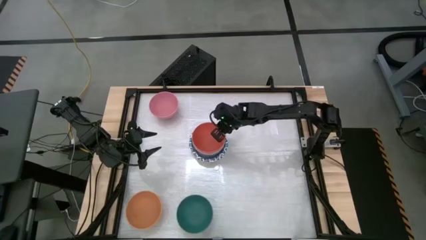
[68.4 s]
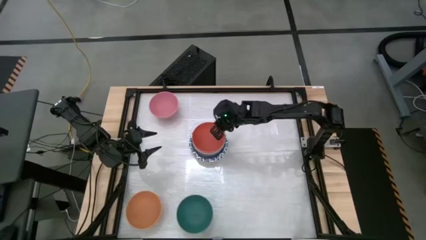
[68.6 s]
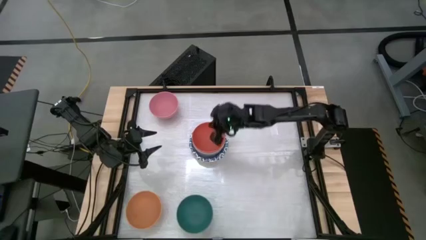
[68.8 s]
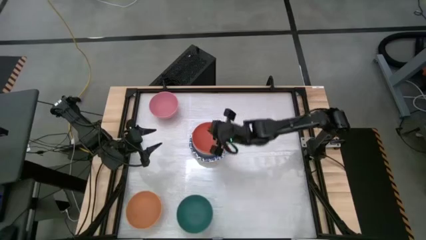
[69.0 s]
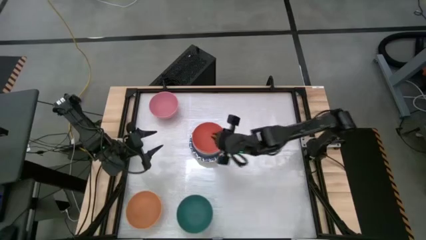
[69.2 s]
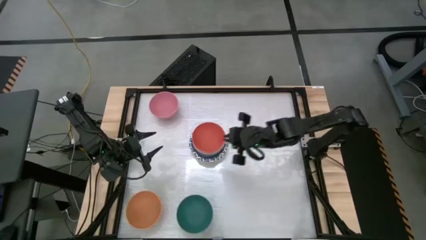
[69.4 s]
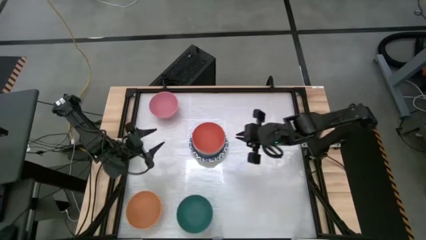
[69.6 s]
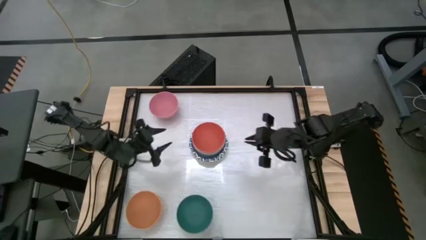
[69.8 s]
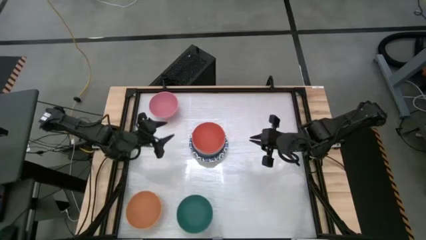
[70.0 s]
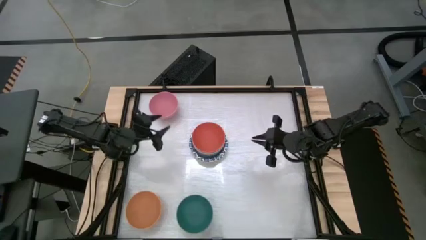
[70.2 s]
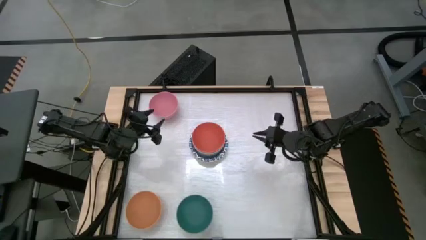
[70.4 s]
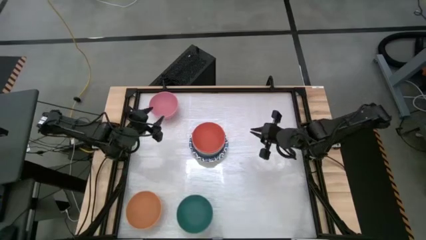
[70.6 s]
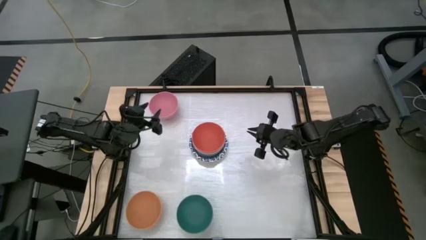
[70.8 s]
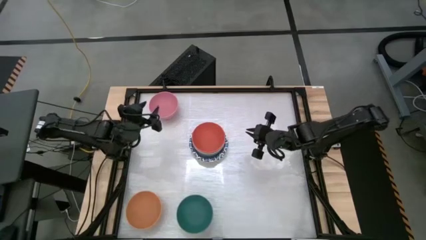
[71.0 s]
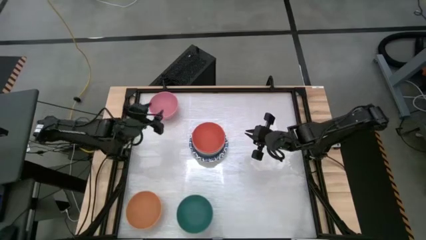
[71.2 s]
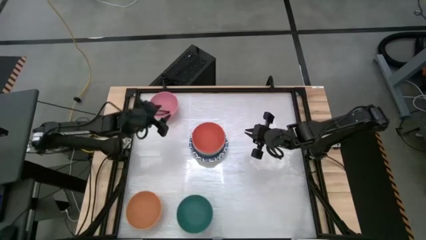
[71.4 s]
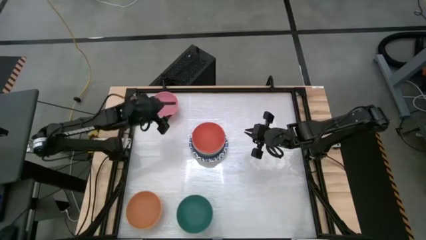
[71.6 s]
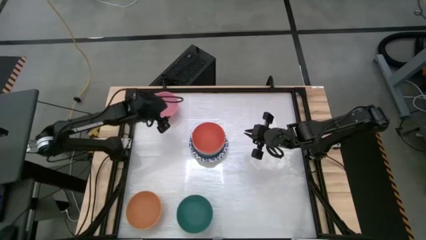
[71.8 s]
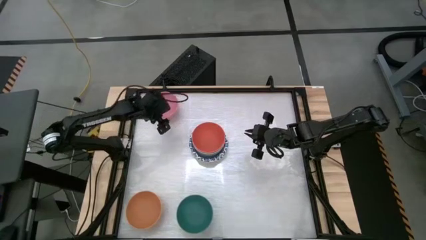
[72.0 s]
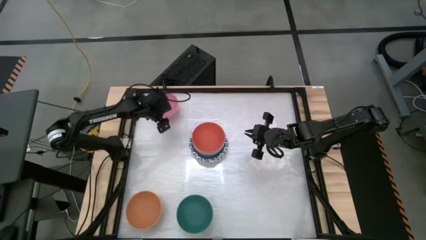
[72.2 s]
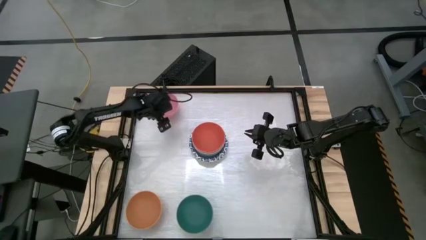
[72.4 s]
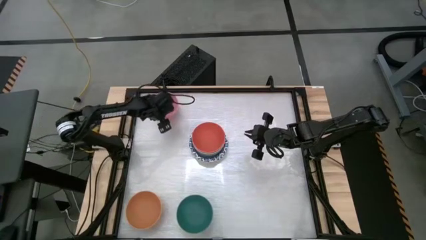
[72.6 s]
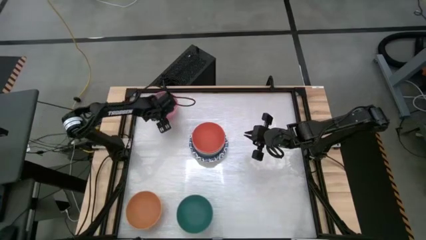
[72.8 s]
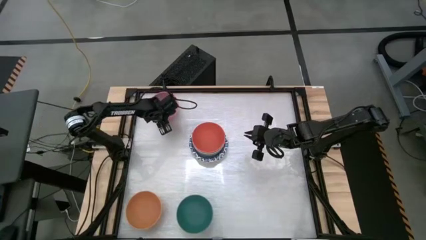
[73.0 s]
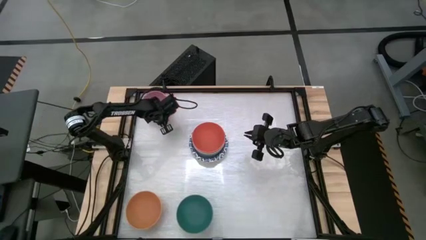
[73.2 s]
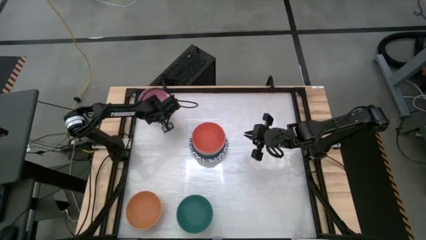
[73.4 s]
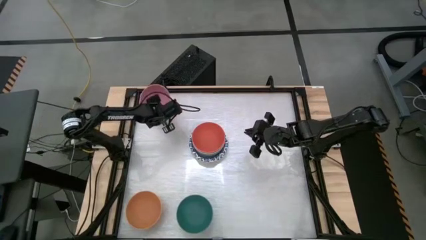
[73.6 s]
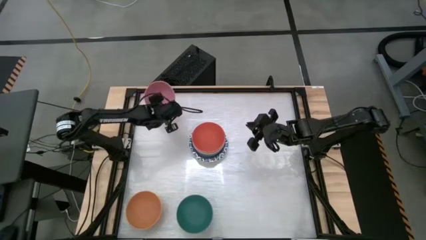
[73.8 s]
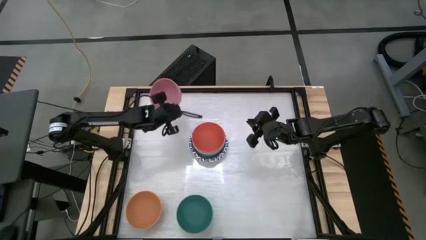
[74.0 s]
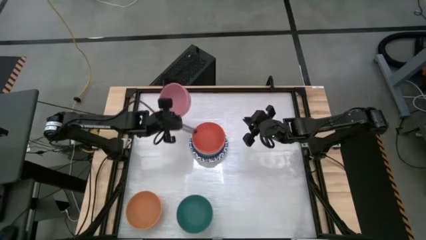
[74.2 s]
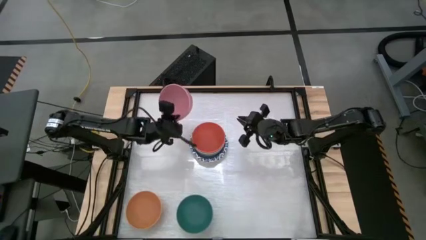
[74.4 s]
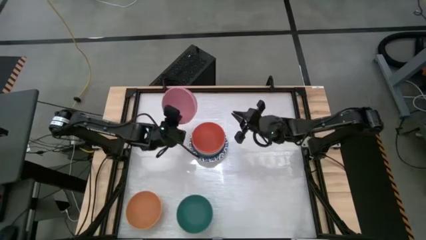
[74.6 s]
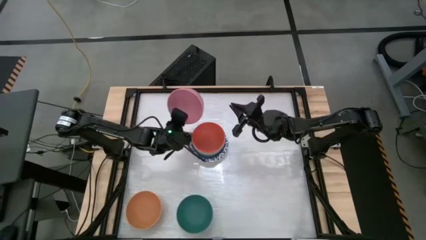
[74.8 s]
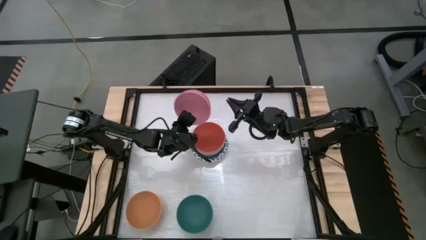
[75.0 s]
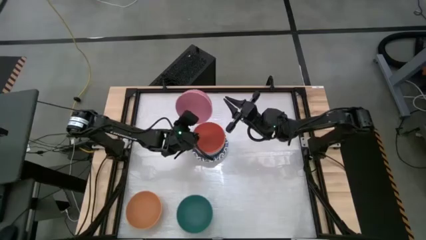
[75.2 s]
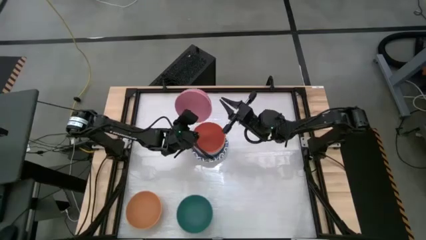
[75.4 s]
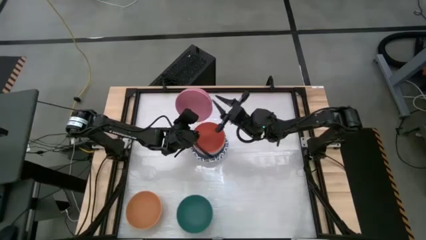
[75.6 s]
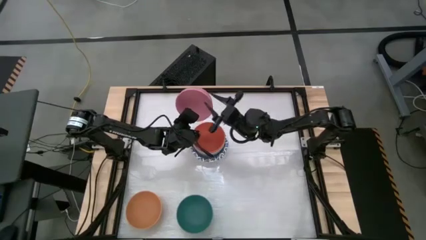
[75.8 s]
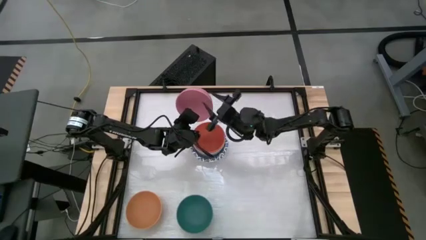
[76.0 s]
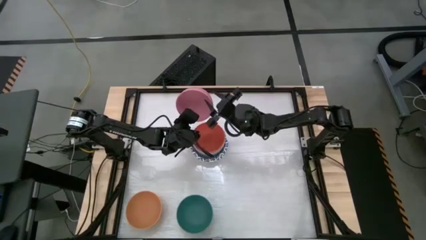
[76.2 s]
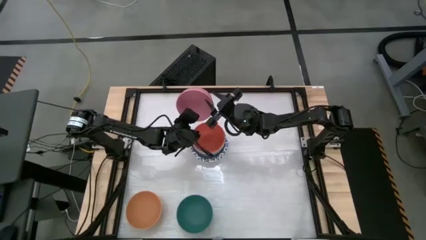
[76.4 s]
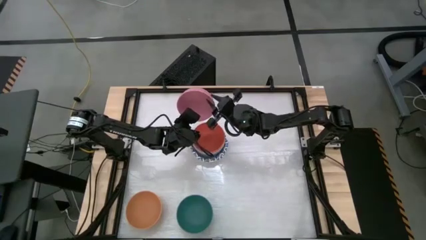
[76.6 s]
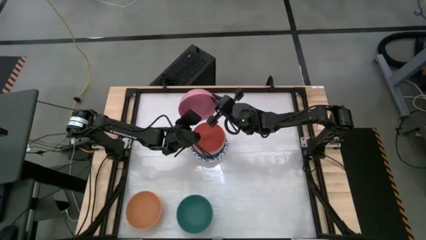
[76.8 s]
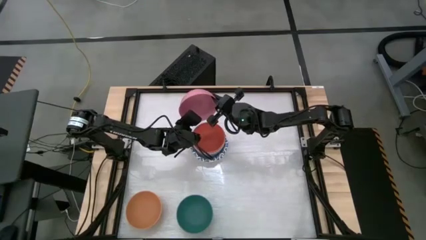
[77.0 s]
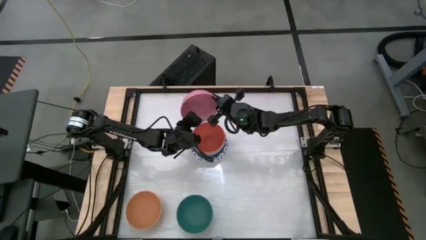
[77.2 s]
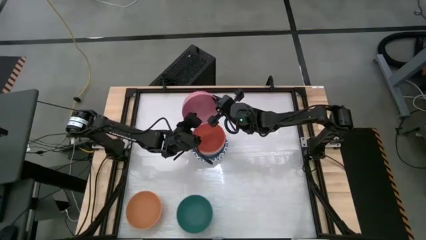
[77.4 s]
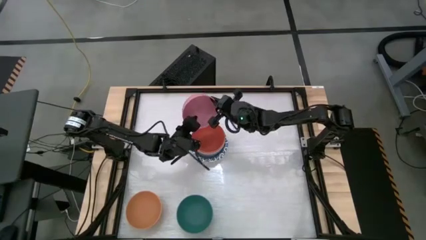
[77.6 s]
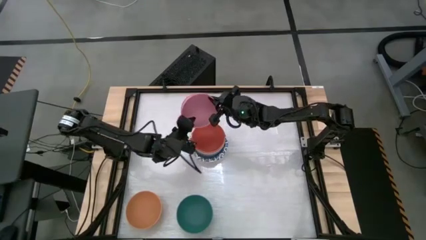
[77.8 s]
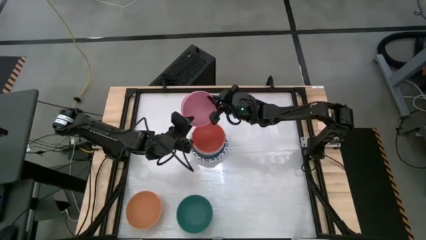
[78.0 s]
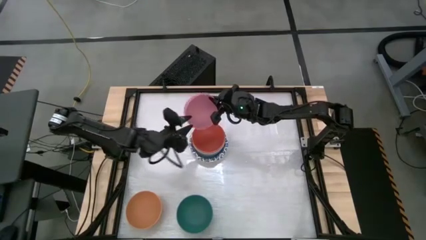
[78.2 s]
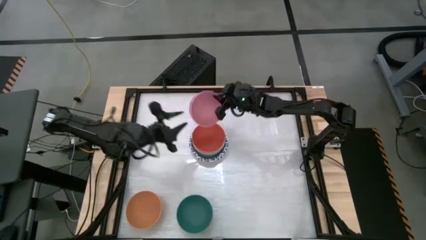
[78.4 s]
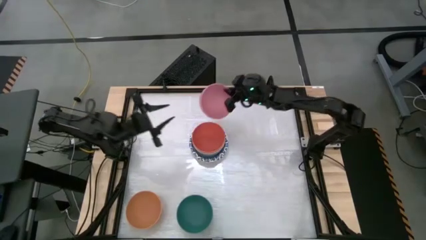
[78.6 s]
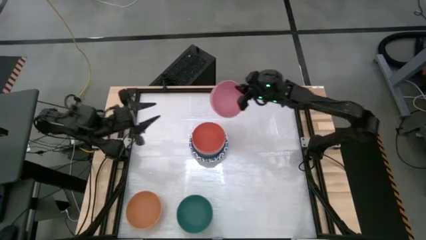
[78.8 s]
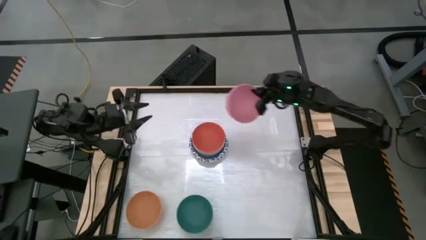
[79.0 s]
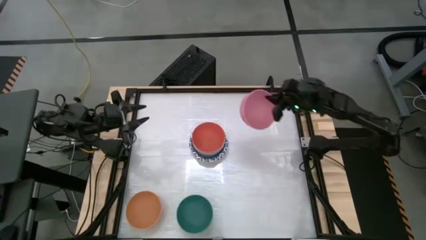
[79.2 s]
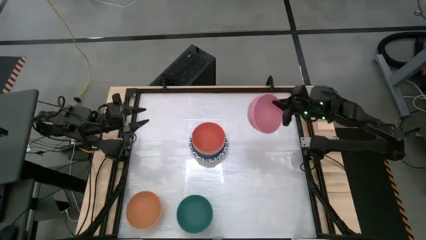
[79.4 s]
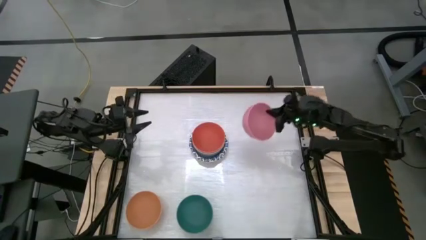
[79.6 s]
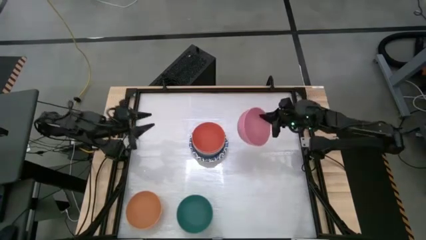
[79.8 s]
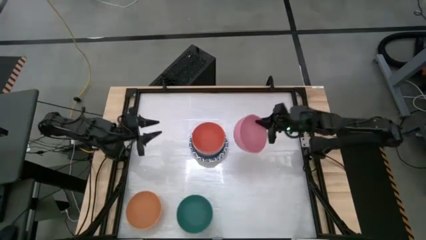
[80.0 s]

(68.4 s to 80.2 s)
Stack the pink bowl on top of the orange bowl

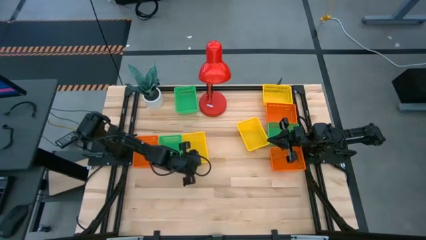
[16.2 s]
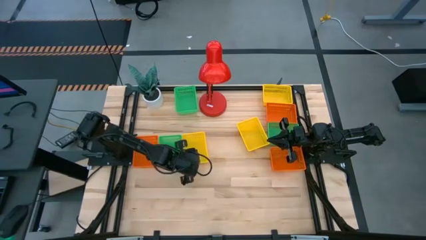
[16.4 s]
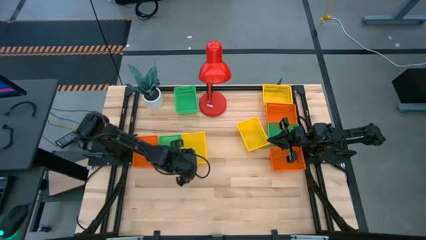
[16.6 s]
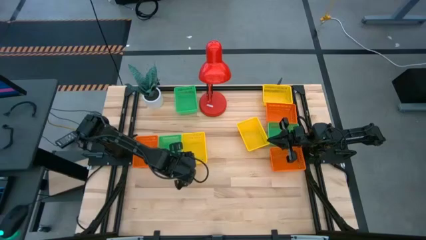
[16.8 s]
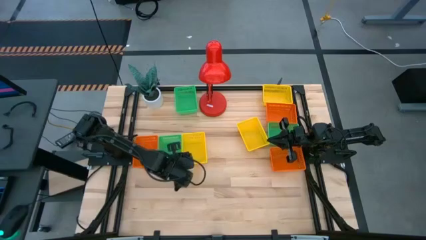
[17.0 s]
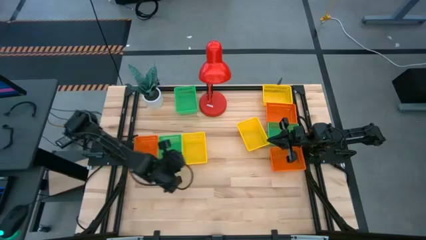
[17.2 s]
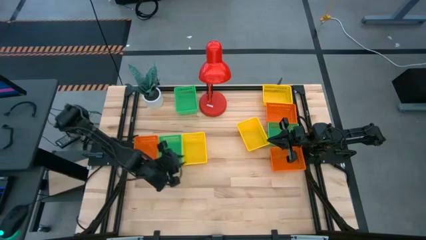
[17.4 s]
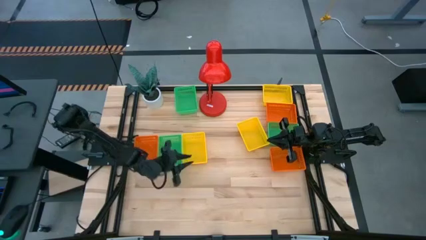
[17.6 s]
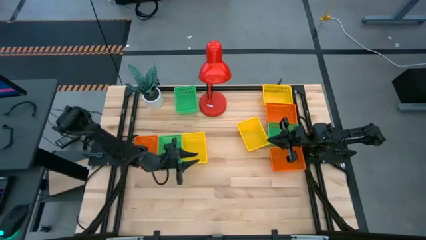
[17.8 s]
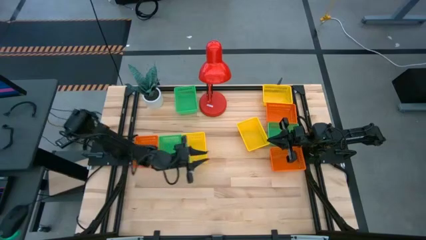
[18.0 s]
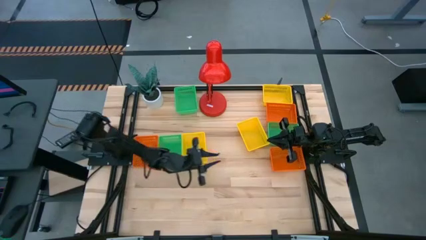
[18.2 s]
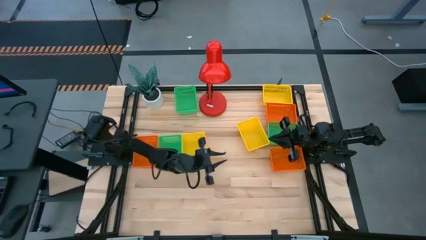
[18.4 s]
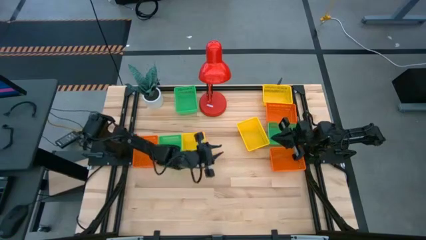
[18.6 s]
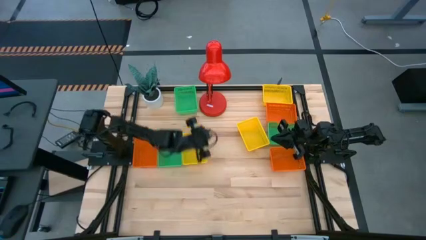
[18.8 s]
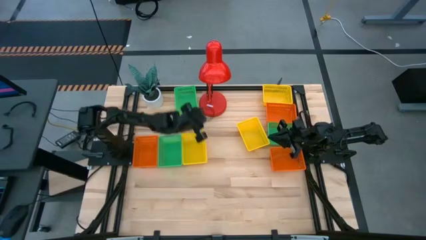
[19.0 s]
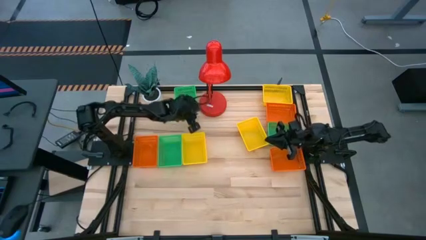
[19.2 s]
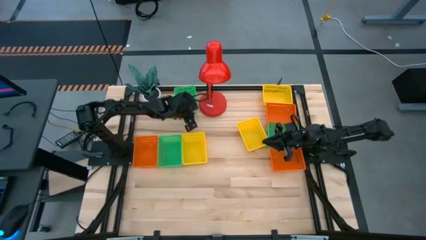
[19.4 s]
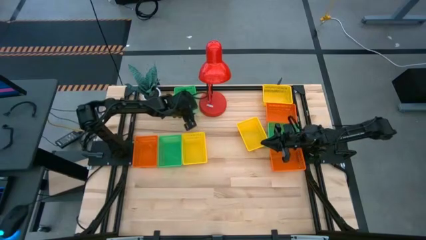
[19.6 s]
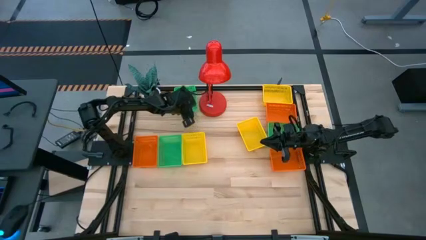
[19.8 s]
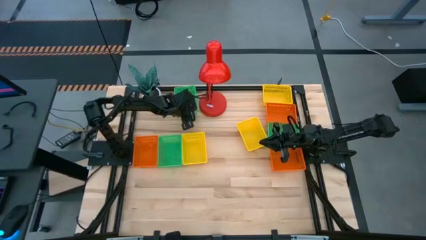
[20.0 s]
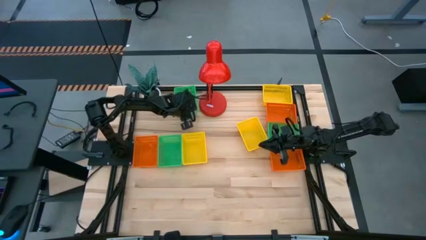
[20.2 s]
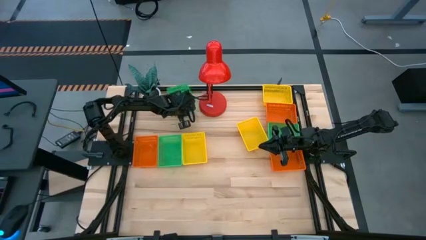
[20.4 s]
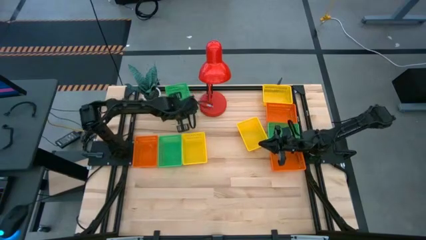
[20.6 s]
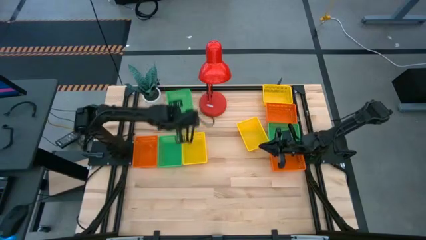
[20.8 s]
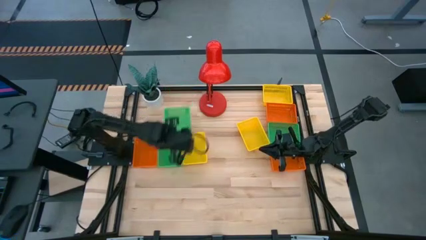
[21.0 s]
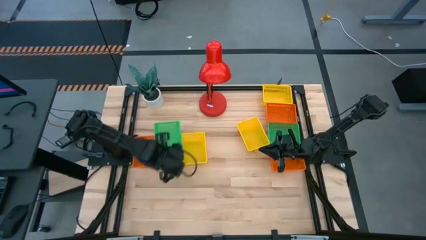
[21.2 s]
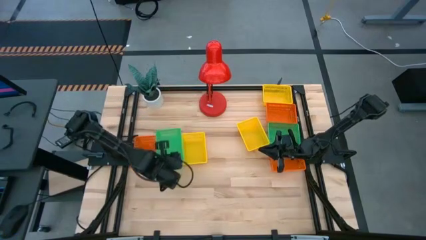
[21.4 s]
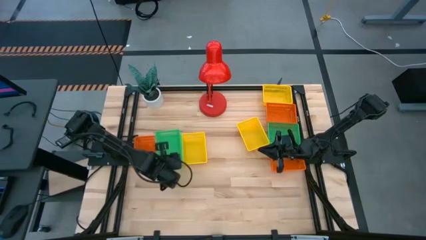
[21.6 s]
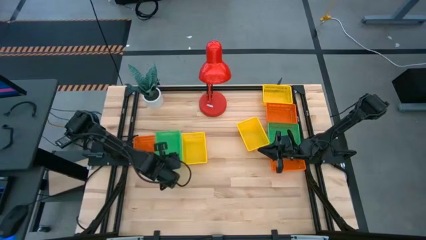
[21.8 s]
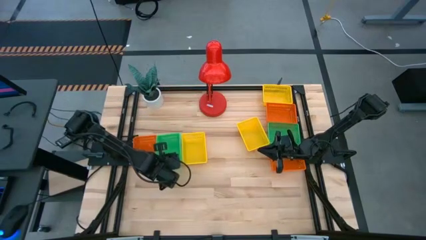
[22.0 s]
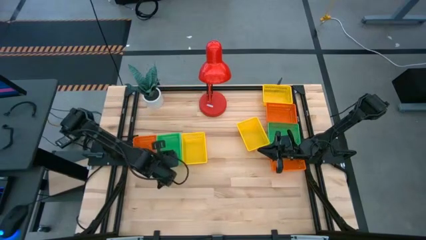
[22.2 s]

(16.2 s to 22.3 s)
Stack the top left green bin on the left green bin
